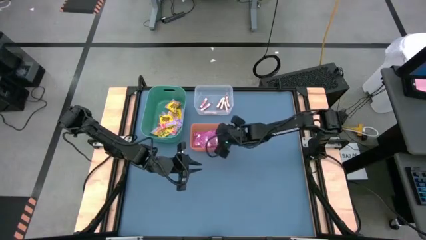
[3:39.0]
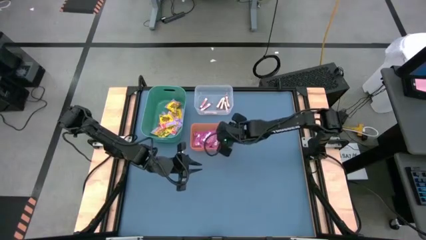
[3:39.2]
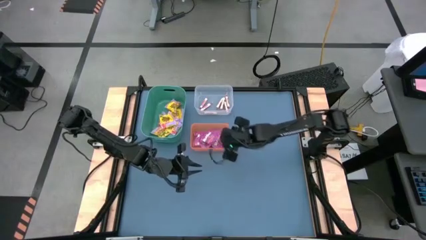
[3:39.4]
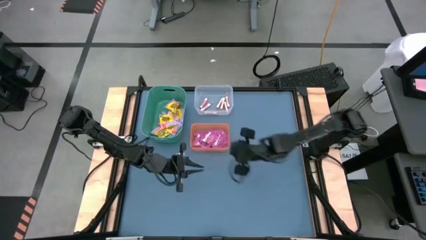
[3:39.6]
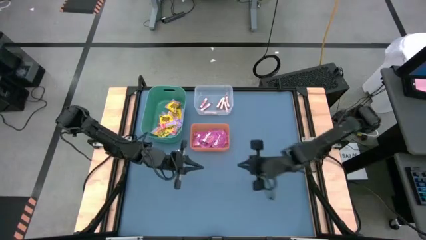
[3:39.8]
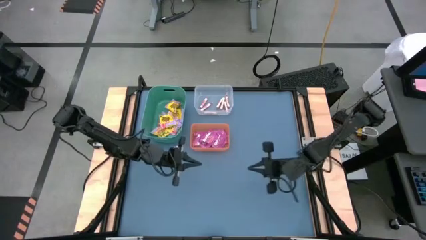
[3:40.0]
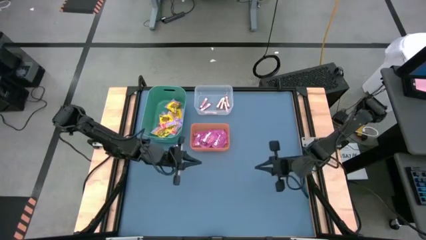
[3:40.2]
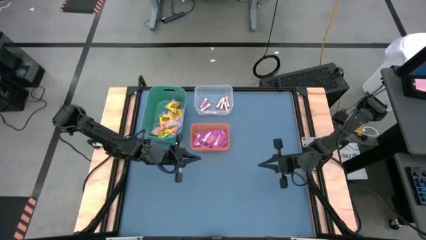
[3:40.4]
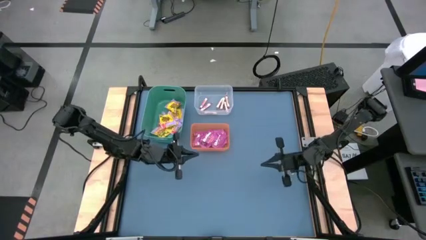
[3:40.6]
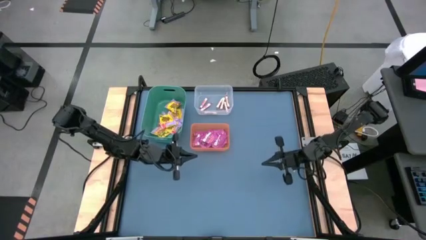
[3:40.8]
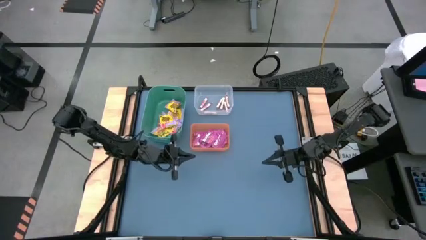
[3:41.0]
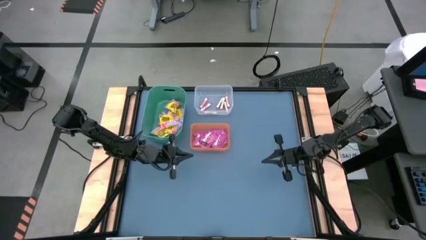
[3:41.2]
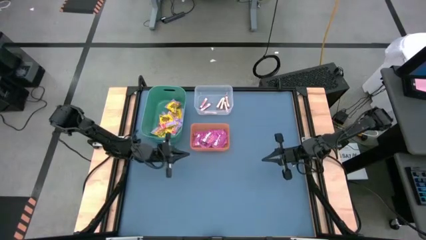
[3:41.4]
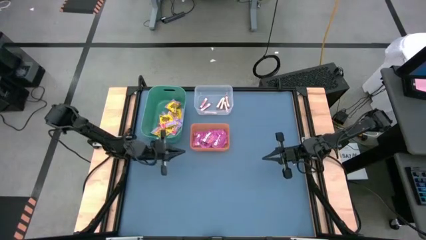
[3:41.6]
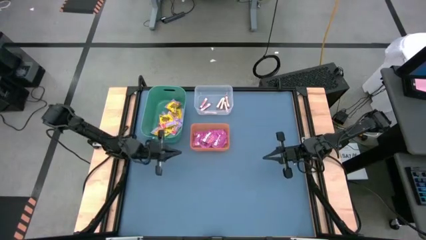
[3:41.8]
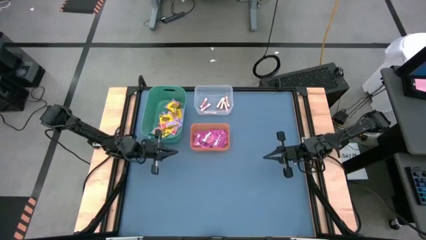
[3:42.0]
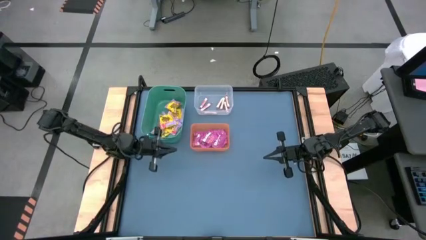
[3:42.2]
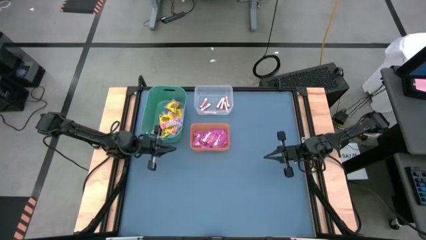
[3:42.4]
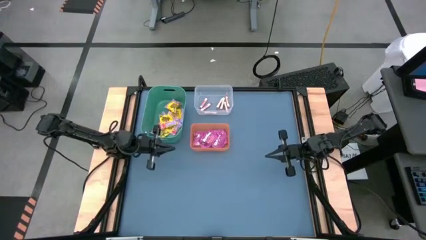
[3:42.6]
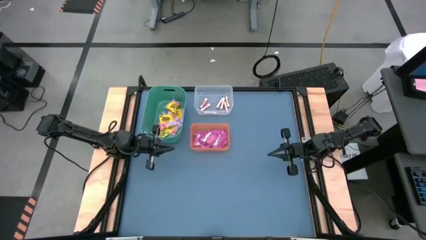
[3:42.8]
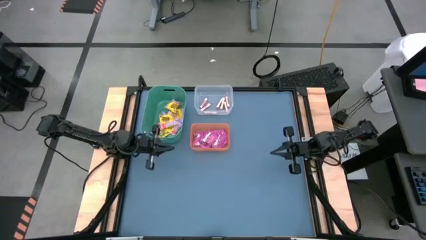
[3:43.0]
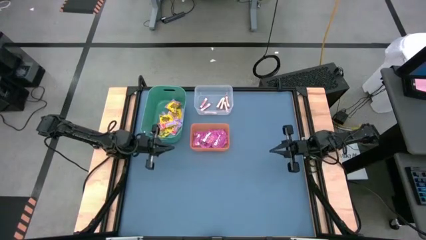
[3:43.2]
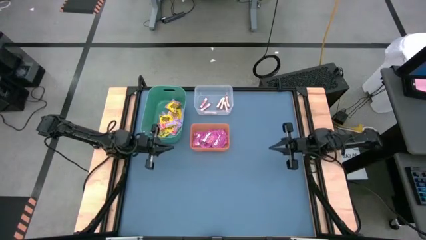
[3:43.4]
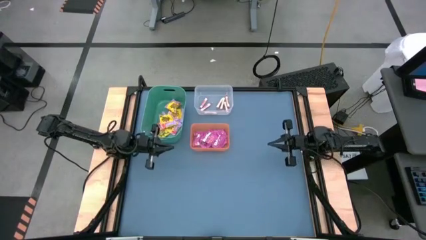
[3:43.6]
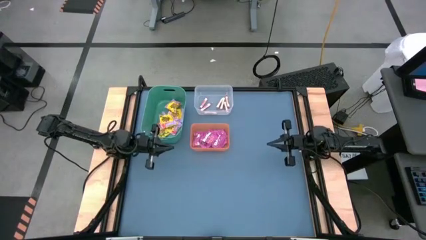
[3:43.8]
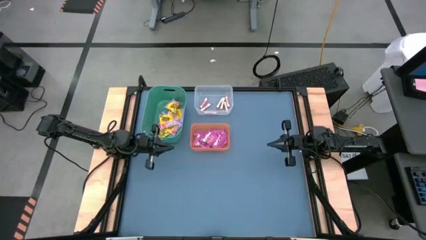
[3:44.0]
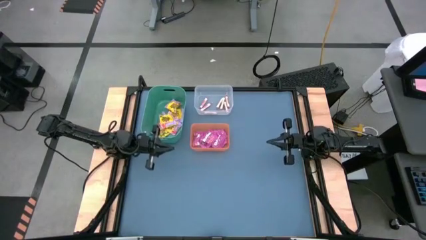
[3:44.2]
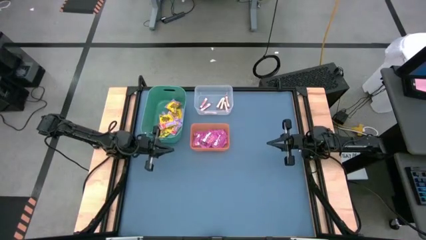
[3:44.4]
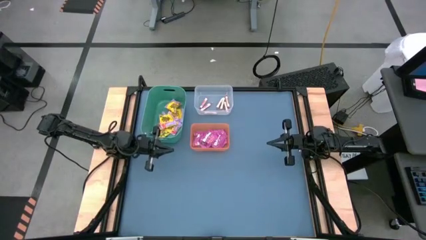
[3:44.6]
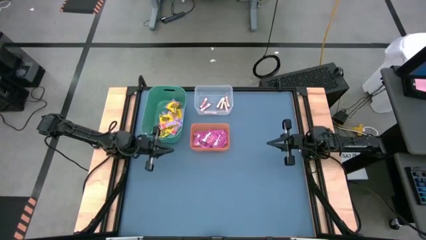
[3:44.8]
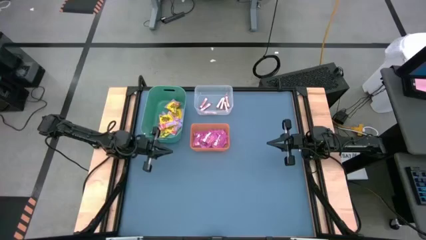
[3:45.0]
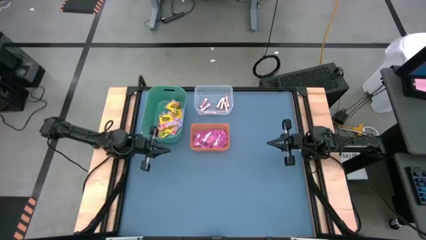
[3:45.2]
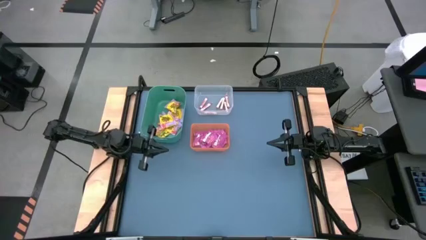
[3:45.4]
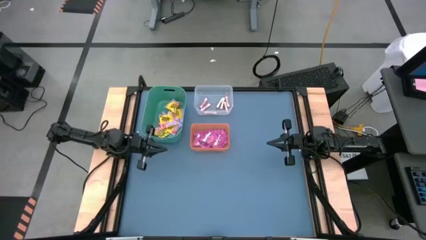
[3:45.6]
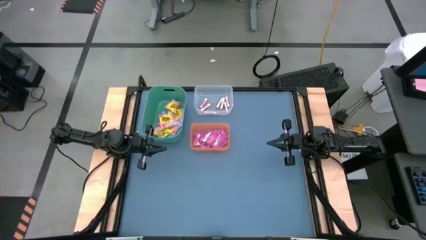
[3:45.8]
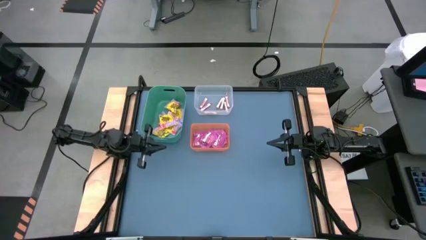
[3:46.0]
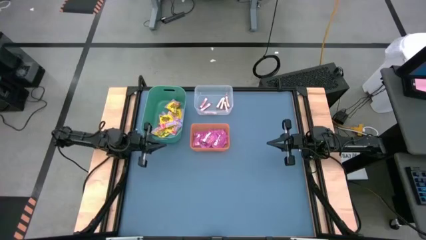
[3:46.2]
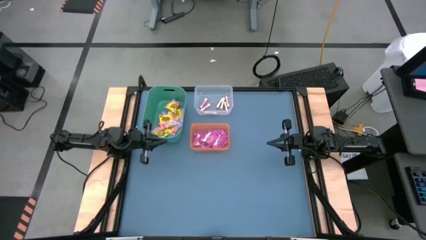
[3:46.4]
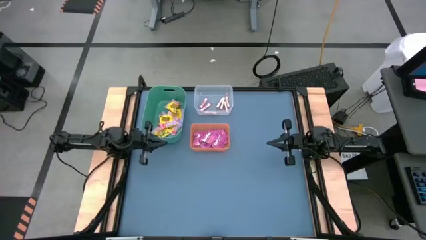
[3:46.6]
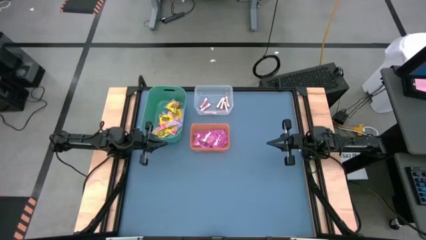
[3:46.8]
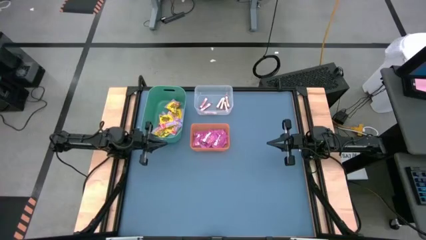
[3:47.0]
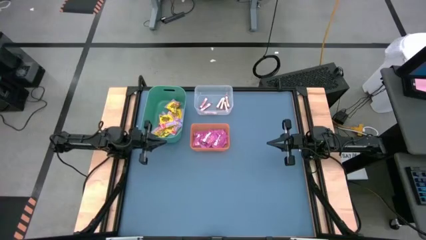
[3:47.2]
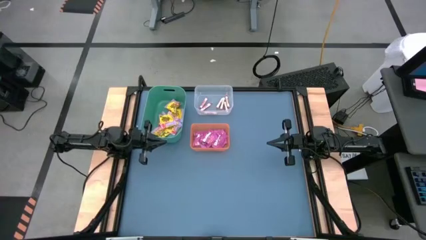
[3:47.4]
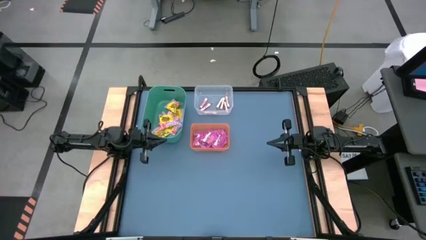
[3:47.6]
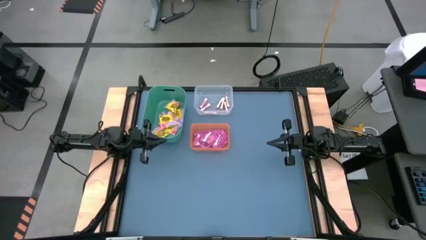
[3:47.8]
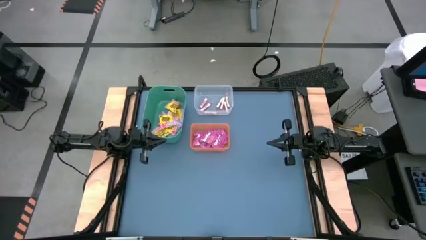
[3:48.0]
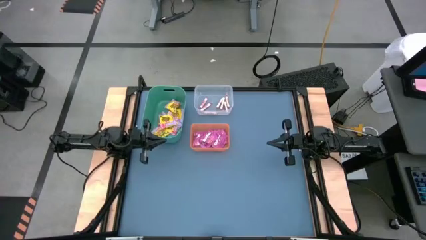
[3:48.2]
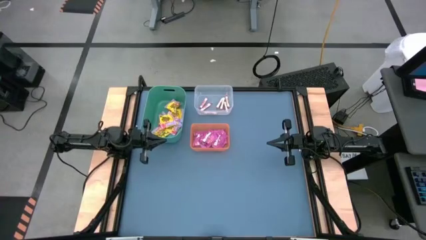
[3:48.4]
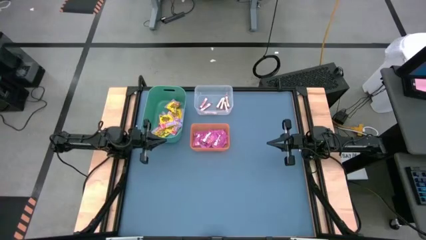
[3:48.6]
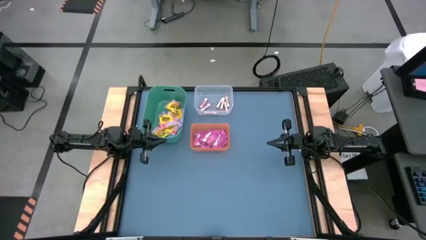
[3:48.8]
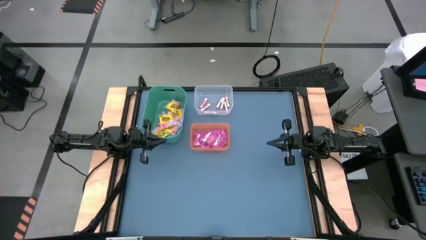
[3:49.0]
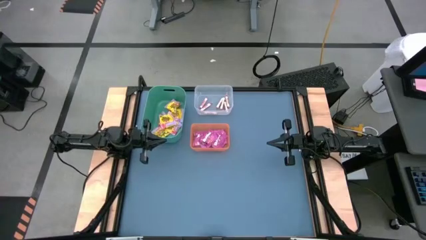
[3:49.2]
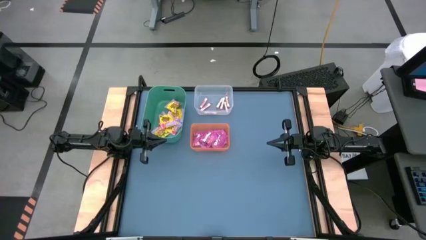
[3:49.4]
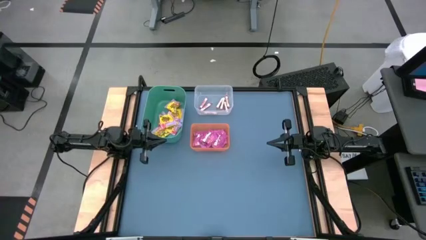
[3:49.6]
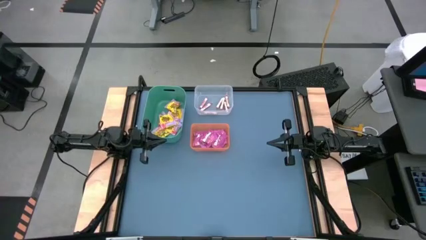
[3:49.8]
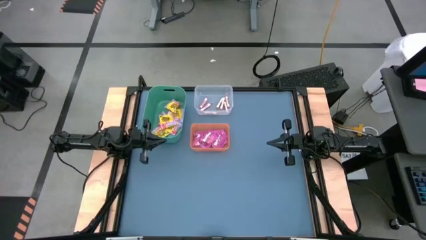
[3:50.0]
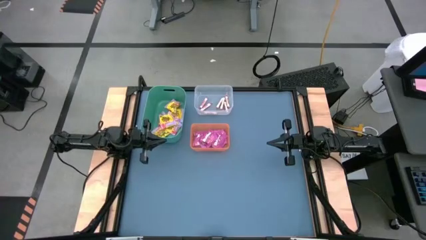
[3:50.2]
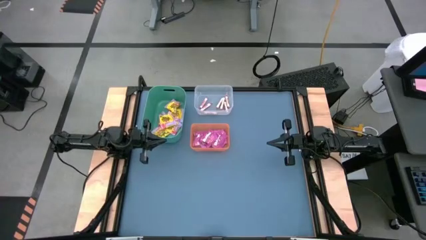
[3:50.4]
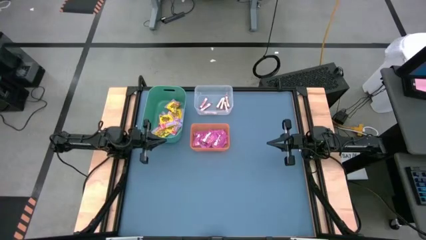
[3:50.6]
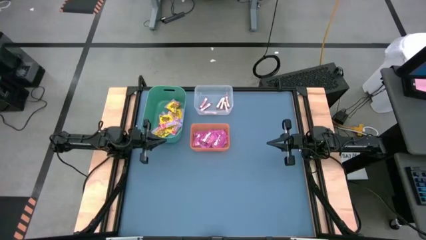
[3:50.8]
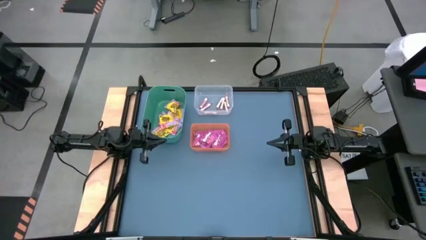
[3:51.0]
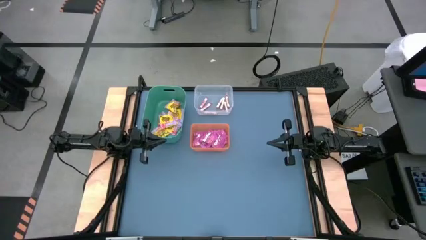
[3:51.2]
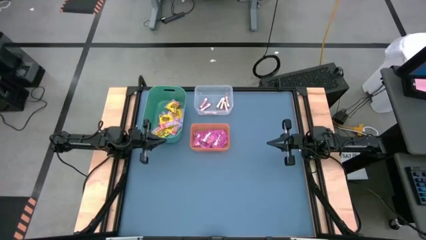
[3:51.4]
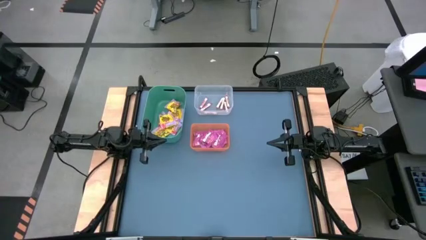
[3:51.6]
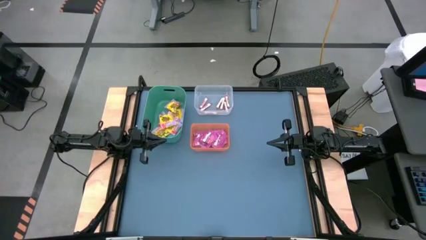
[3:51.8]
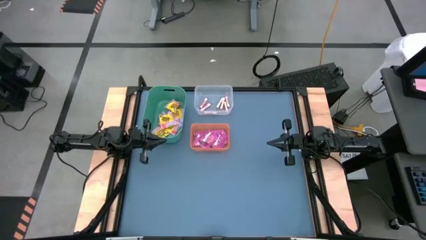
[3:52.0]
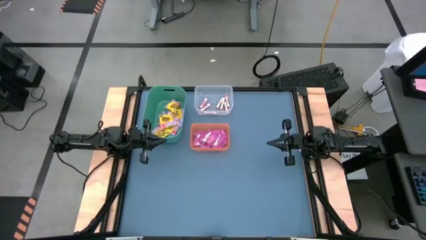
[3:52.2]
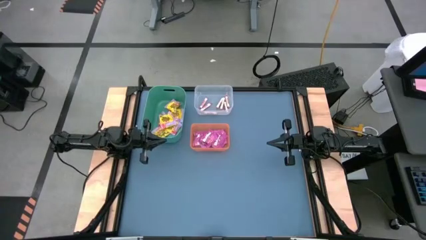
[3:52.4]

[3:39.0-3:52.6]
Task: Sort candy
Return to Home Position

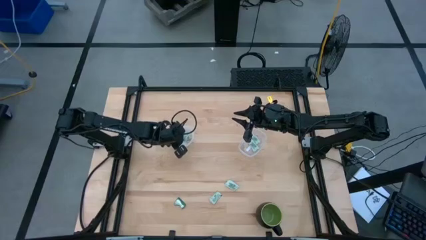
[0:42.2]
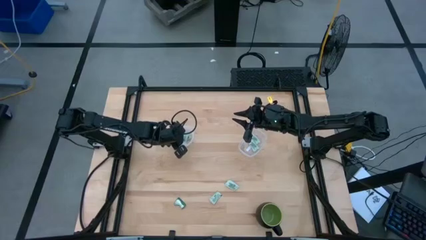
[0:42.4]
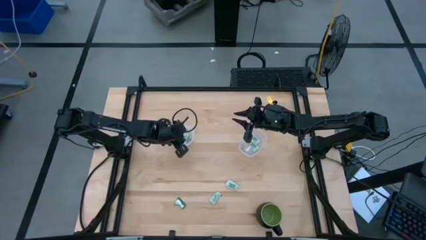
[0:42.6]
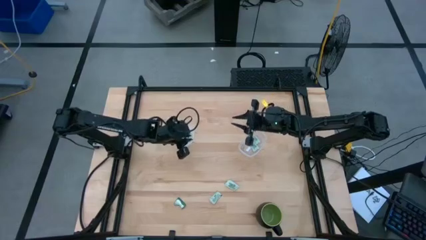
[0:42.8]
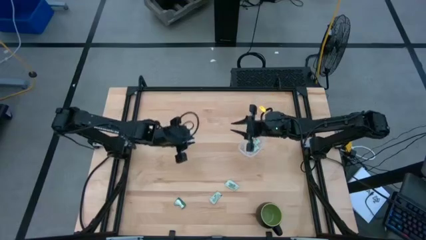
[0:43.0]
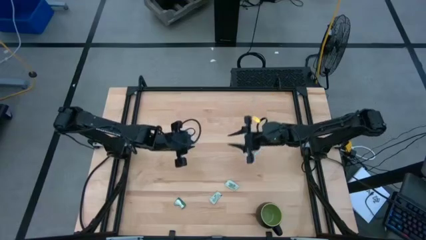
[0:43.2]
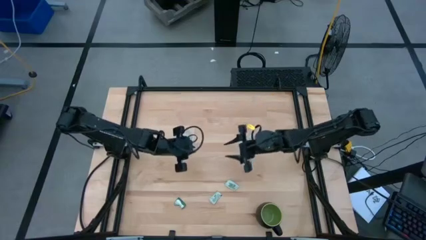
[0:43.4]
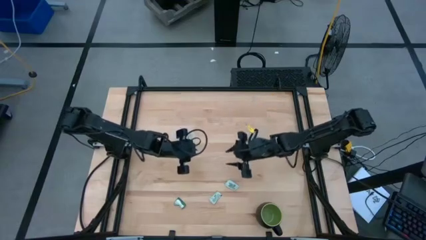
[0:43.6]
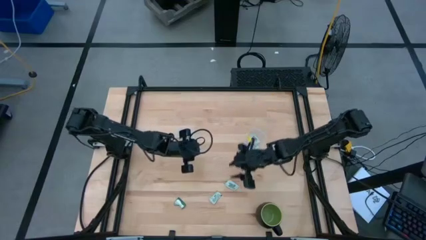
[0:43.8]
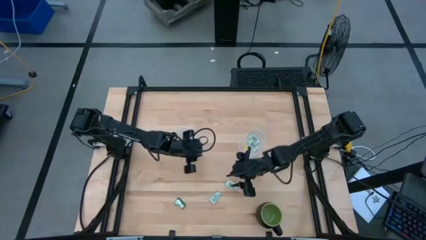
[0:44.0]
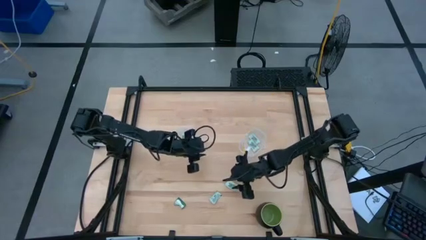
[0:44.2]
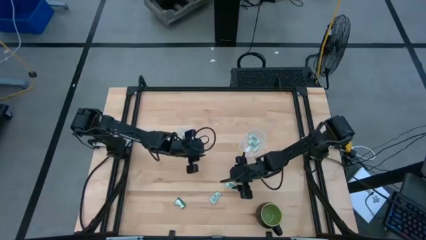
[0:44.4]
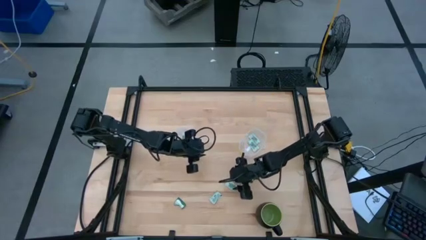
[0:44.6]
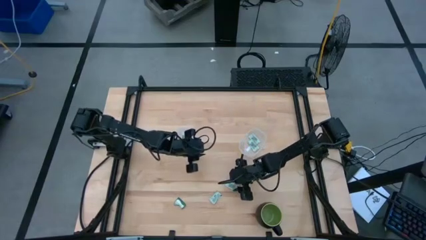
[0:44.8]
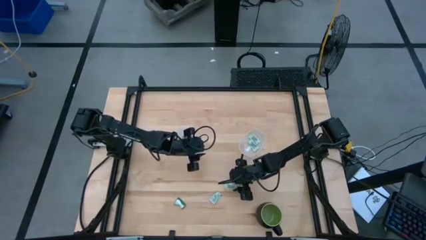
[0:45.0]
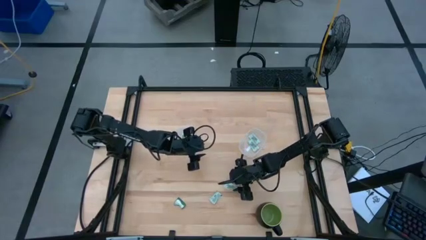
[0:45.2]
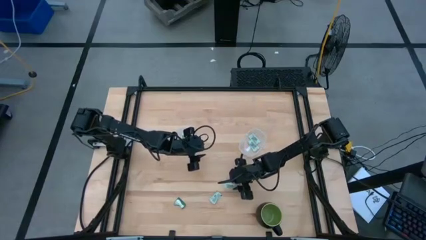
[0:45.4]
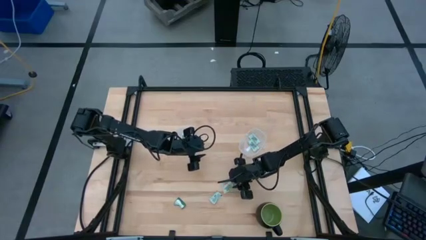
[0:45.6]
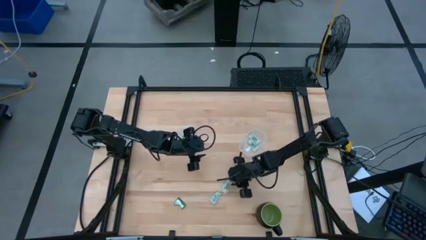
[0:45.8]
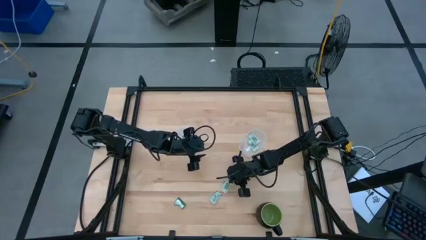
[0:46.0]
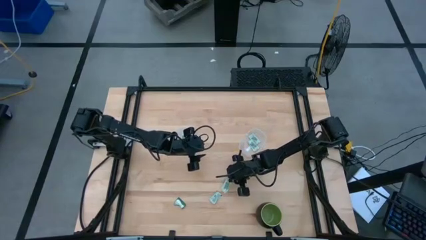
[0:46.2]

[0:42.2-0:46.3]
Task: Pick and place Stevia / Truvia into bins
Put the white stevia packet into the right transparent container
